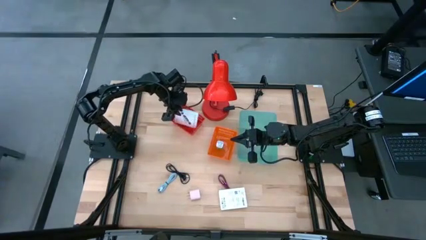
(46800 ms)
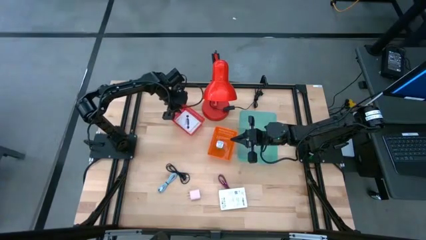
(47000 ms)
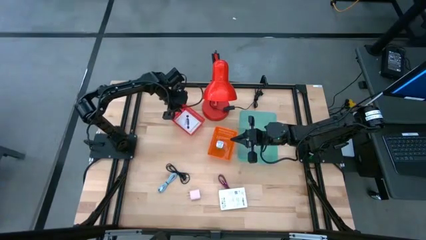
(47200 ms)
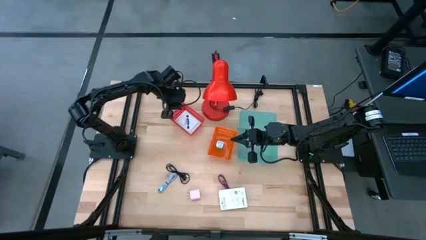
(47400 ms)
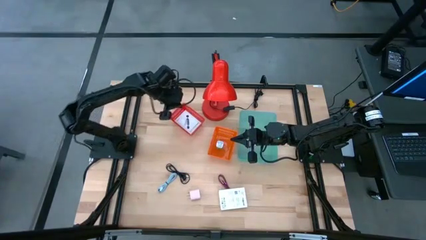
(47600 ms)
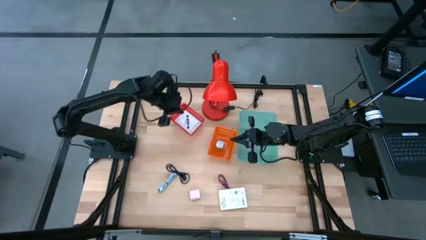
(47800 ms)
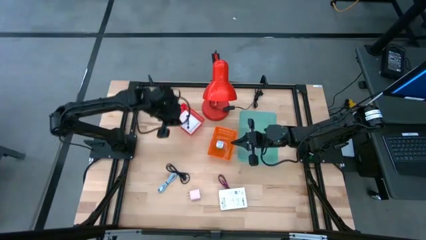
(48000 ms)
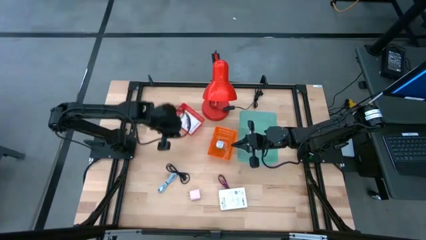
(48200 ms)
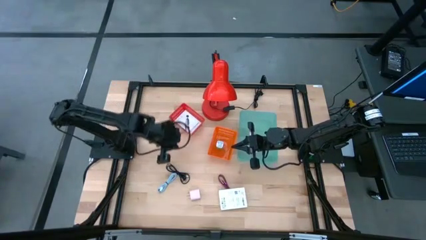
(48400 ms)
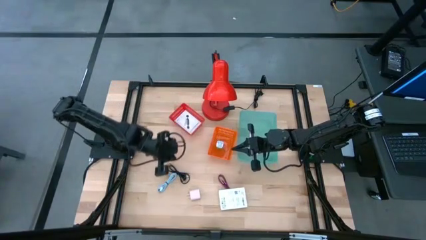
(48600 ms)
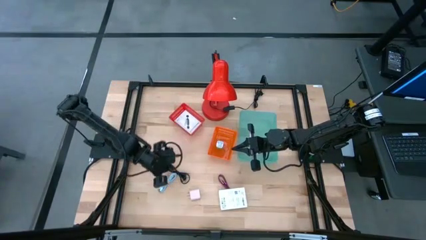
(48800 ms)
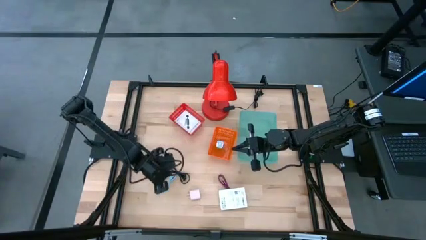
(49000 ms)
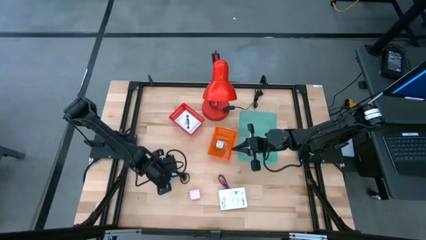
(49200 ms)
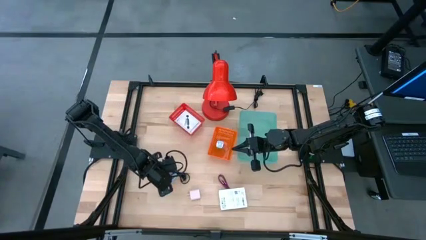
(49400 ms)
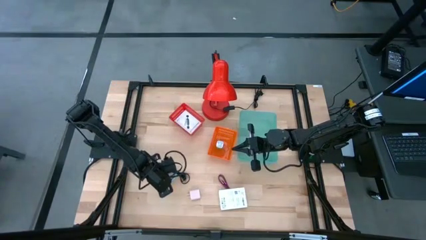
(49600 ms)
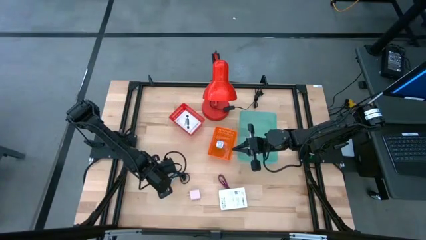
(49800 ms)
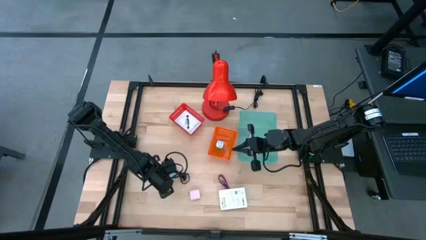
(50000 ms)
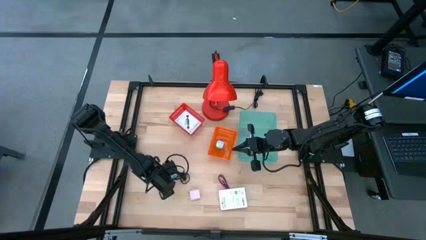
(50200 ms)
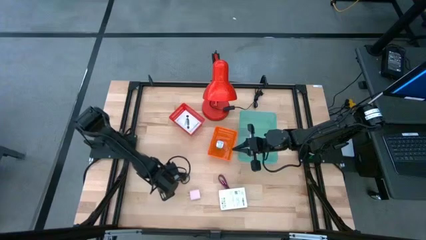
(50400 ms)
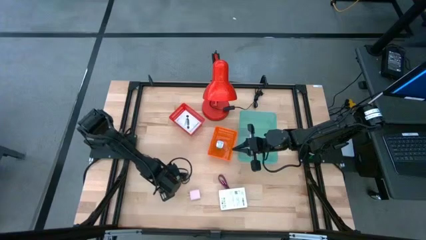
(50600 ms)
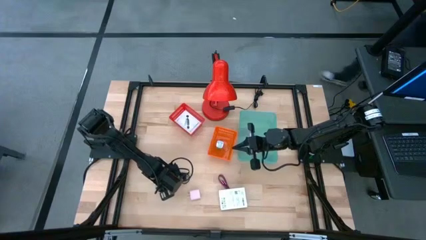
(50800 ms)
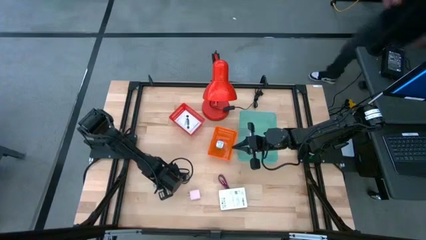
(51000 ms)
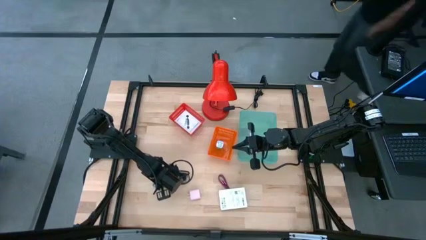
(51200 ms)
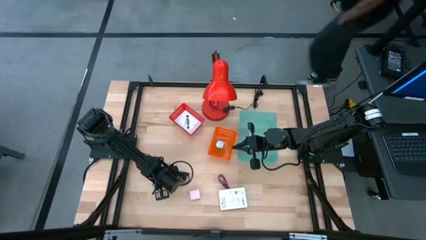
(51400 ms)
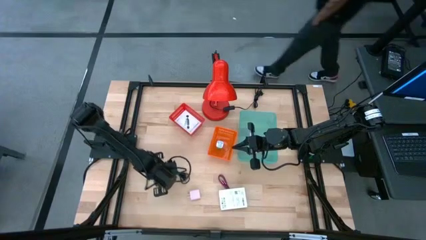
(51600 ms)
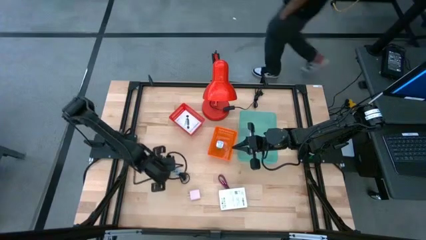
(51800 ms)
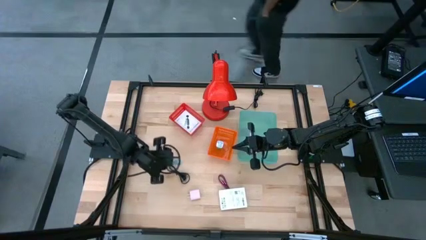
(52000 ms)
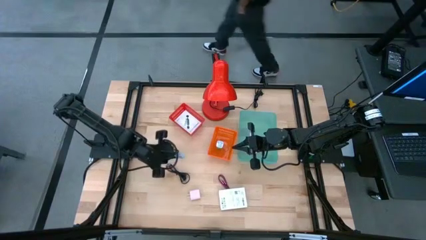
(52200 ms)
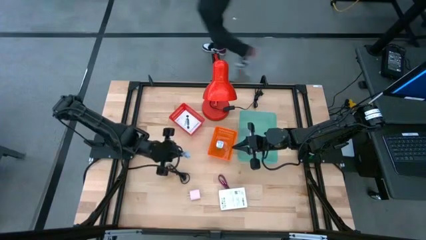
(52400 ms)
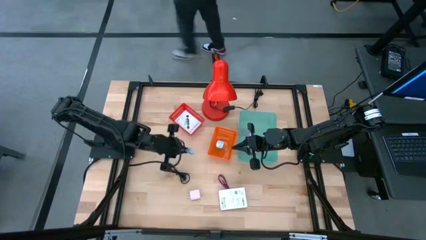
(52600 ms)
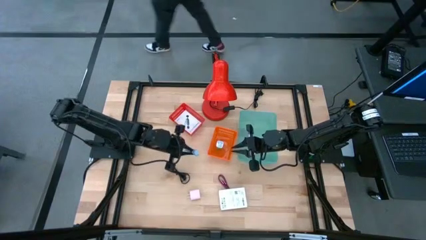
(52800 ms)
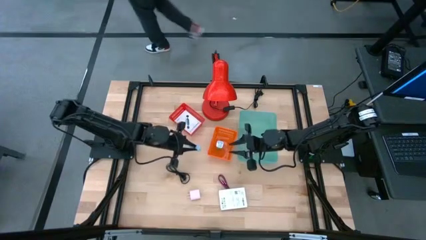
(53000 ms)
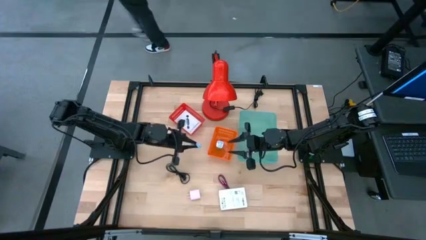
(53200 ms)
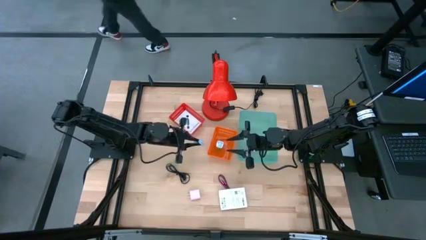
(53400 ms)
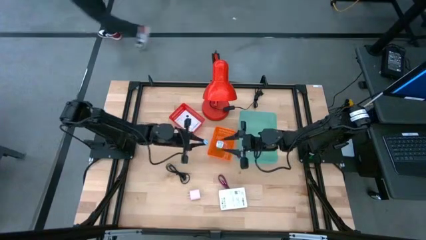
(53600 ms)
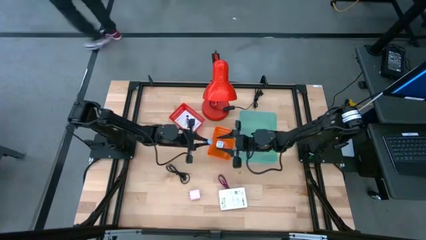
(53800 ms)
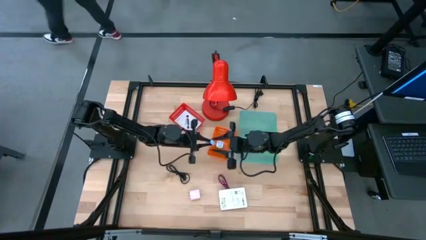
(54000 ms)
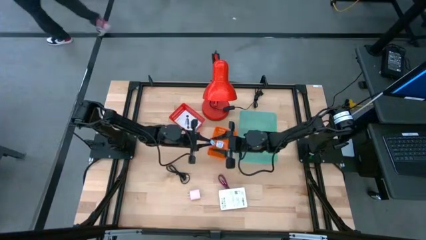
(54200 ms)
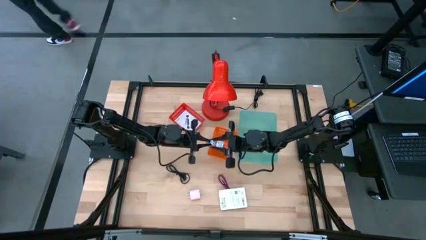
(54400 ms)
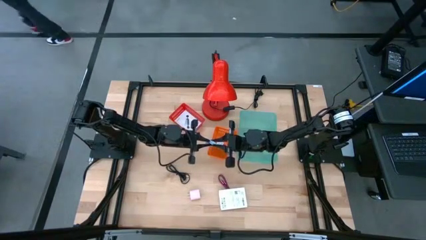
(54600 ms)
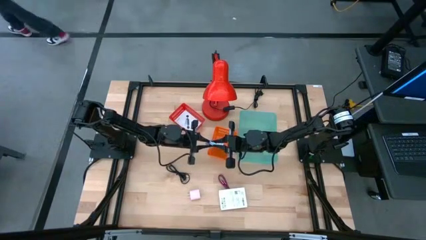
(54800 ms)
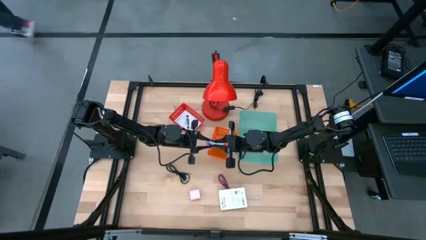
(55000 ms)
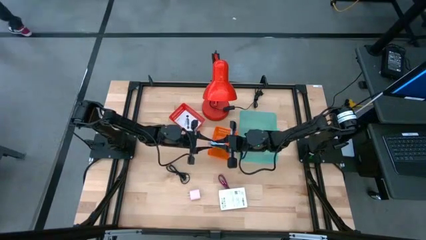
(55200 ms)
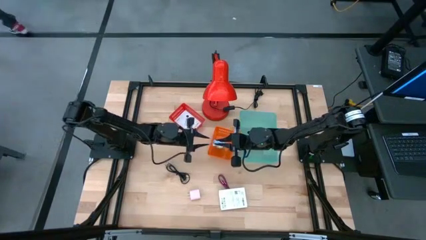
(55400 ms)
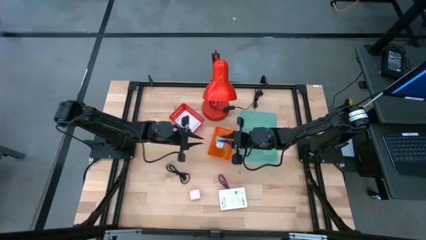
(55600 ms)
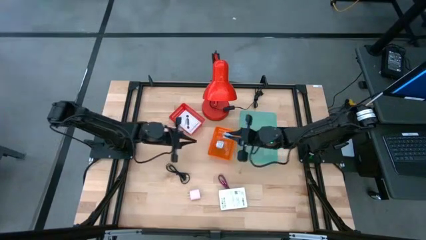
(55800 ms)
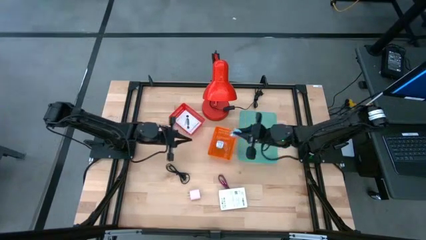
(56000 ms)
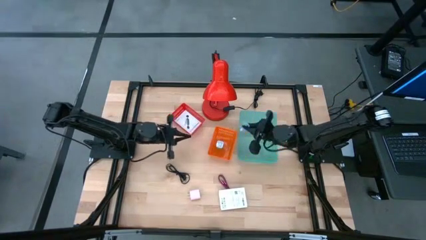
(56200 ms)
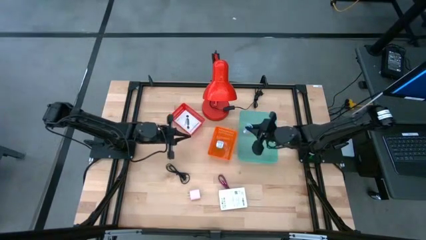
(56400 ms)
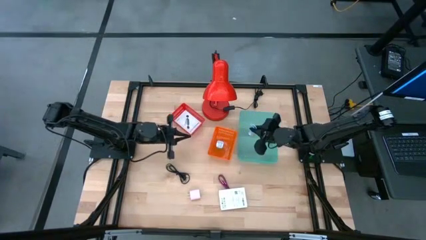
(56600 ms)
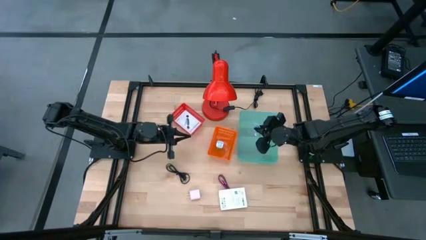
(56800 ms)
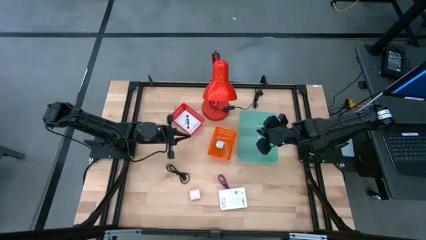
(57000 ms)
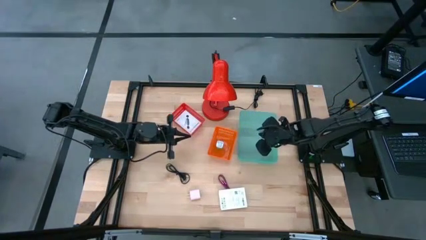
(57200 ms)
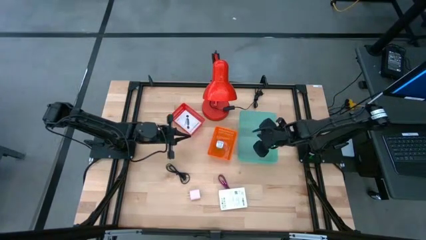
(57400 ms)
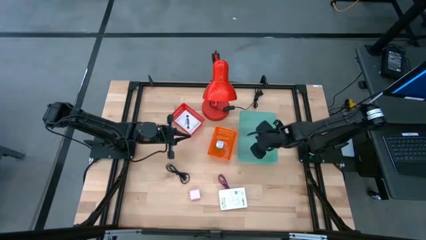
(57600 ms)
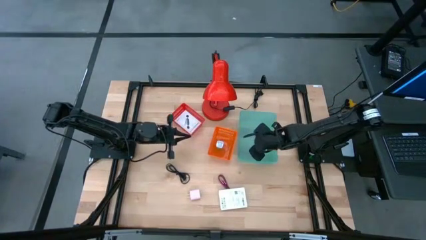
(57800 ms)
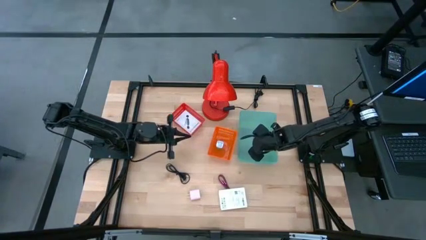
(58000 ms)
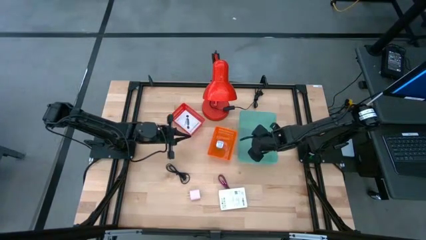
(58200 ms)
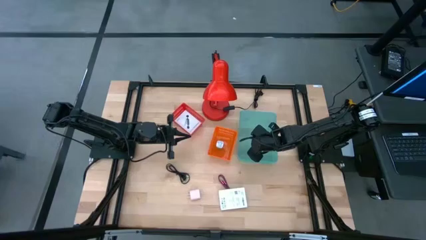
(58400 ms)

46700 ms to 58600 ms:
Task: Pick and place items into bin
Put the blue charger cable into the green bin

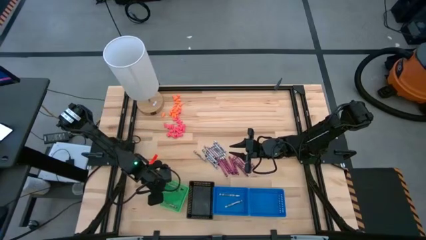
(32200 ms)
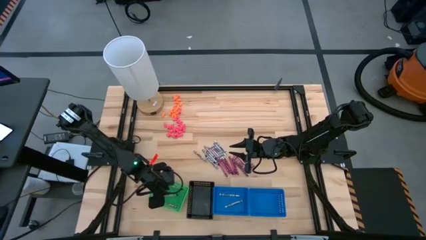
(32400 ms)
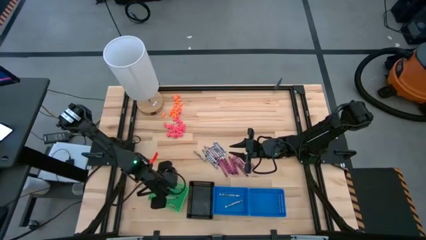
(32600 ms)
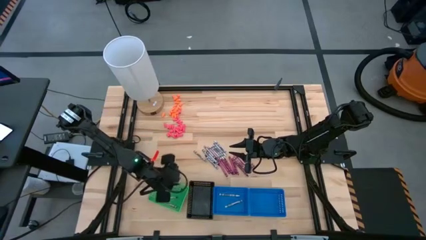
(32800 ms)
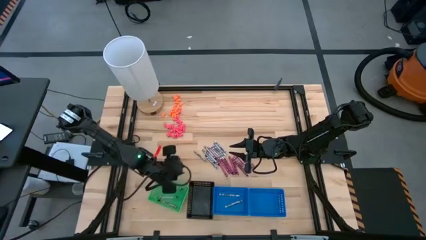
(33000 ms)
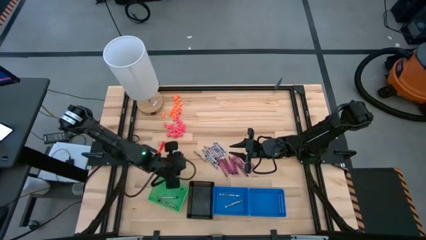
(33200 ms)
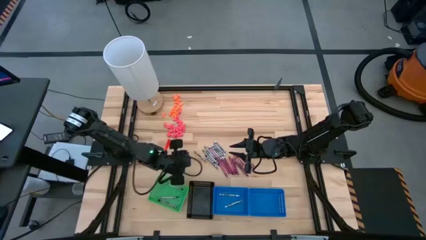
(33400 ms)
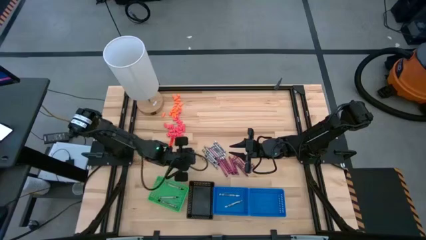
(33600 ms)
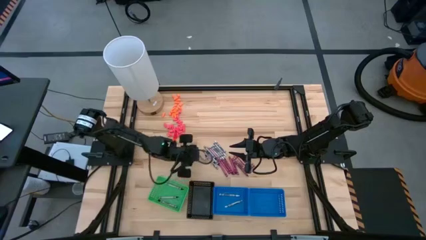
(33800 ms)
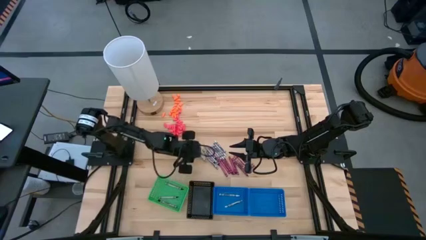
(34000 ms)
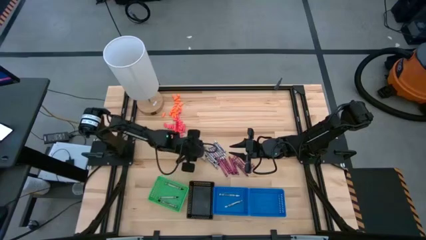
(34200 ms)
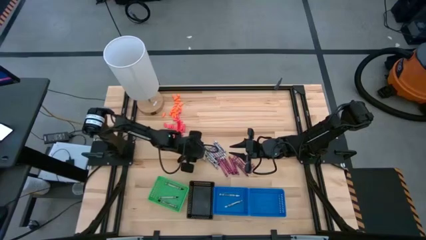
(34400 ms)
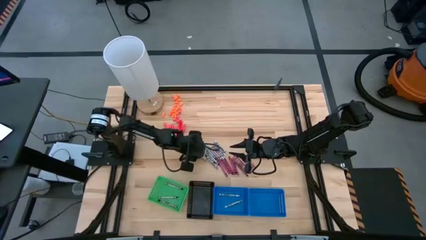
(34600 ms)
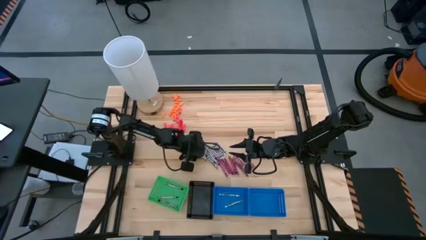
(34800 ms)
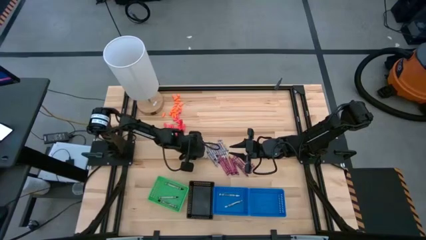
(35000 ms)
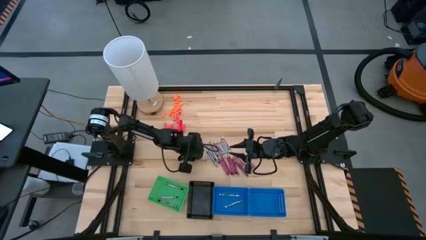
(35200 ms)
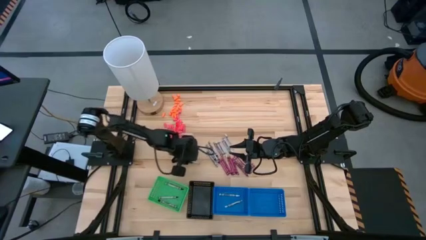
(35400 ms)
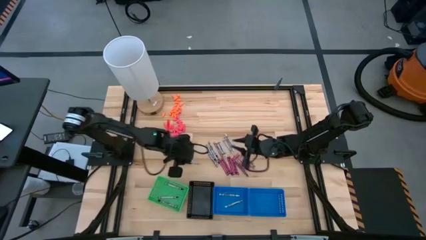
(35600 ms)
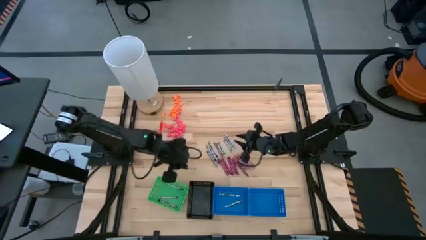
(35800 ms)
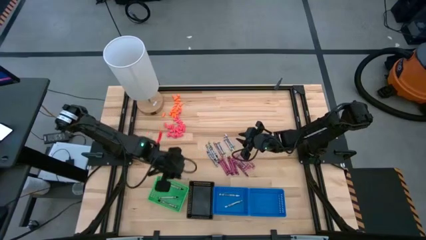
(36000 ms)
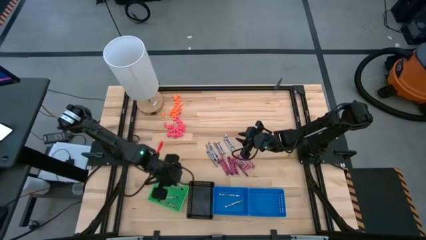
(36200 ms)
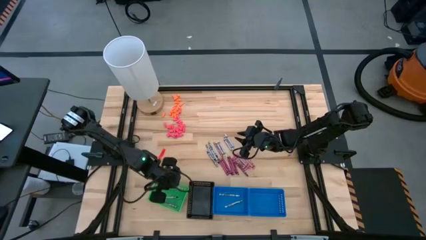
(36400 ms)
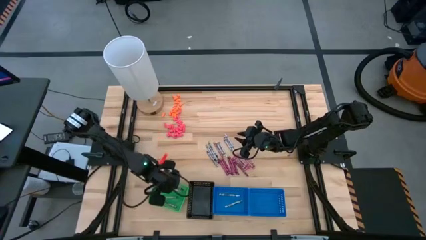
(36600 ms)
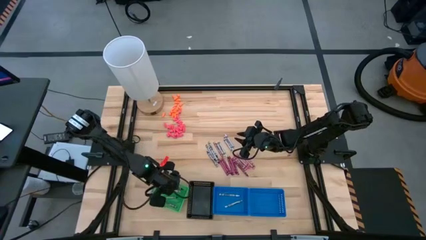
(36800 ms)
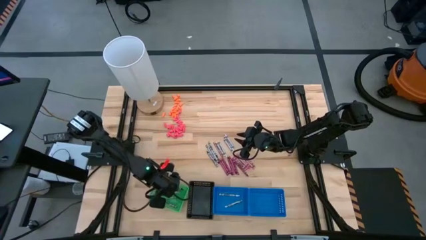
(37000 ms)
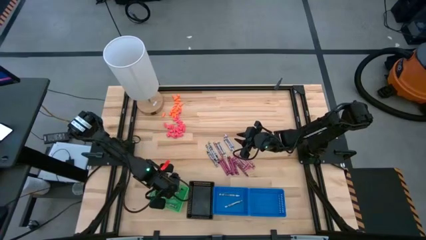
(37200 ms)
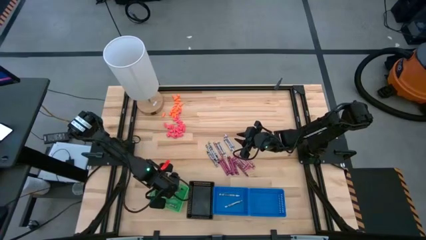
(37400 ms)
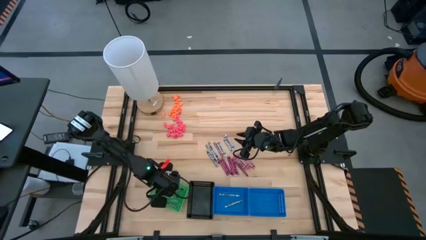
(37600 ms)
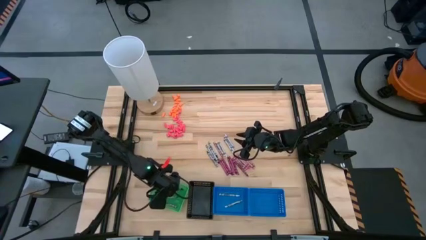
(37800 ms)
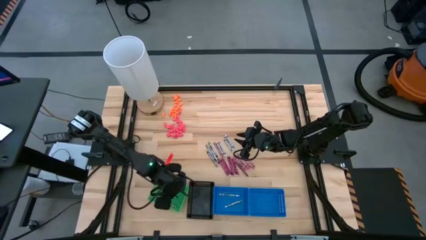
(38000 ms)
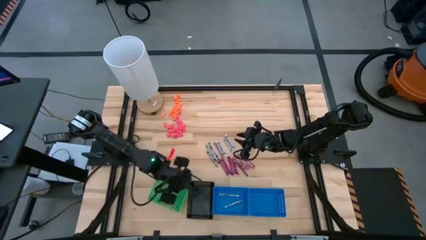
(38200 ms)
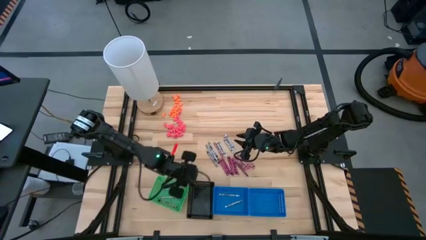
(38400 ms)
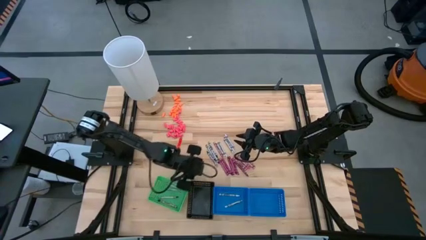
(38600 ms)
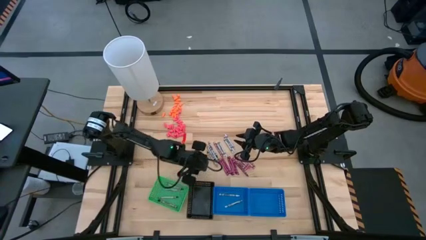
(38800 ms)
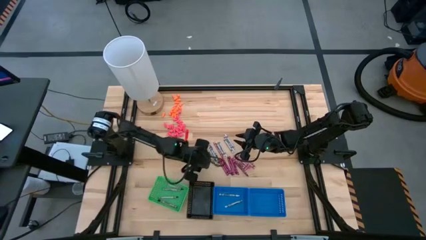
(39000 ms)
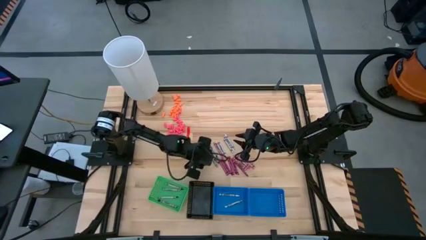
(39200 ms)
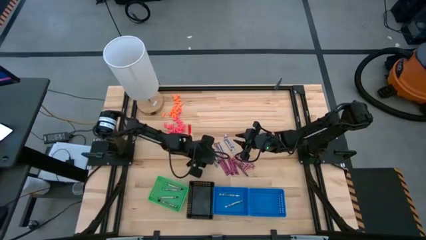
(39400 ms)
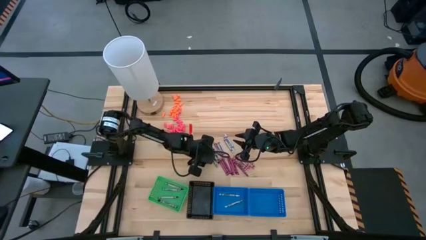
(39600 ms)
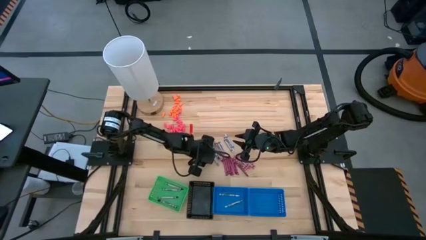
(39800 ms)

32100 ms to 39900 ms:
Task: Sort crayons
Put the black crayon into the green bin
